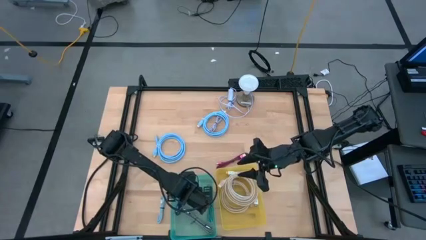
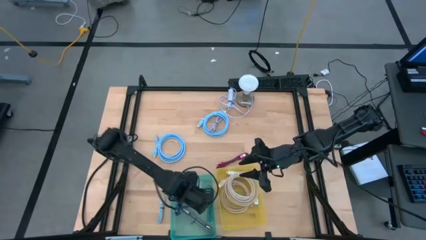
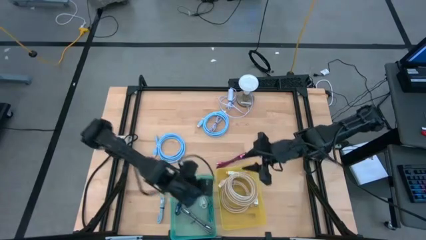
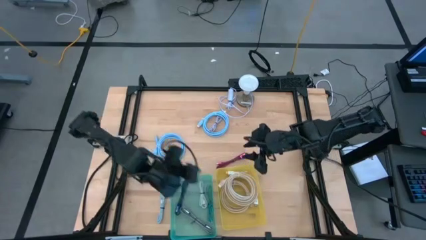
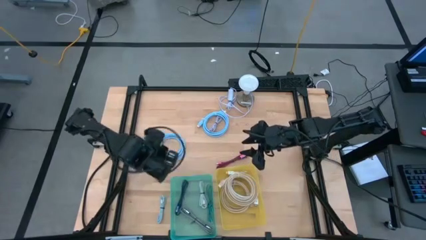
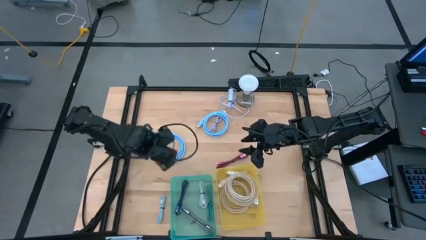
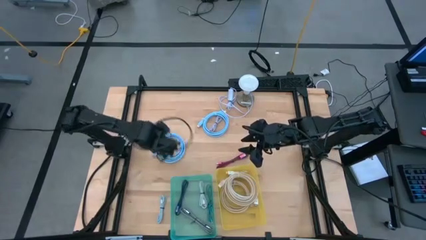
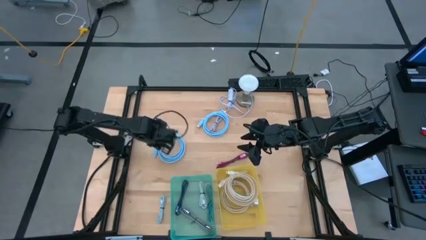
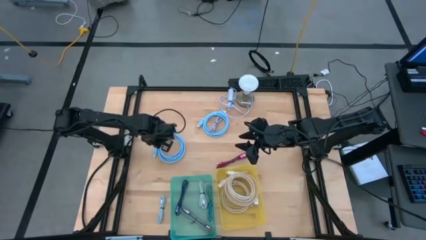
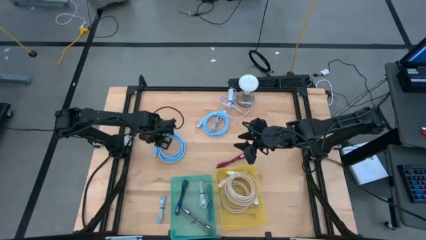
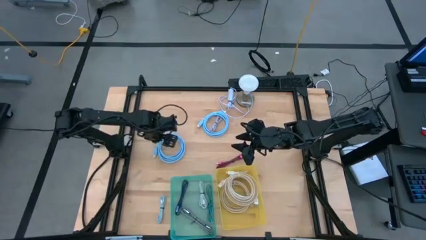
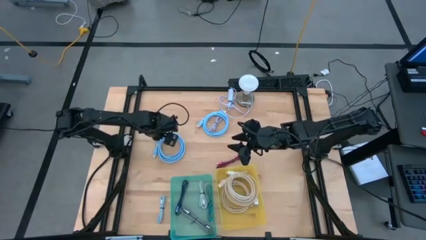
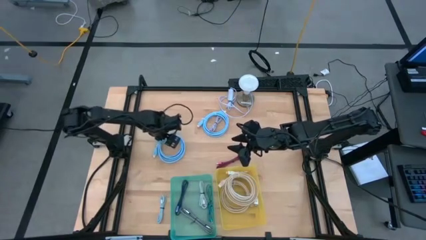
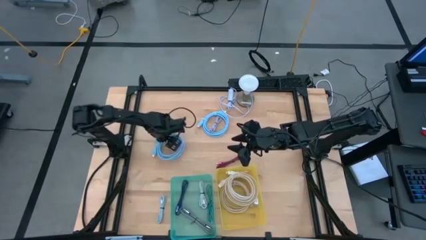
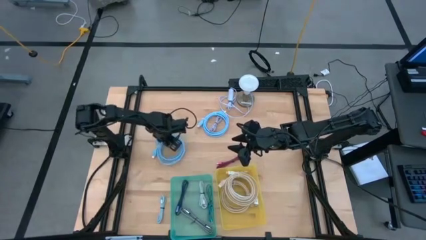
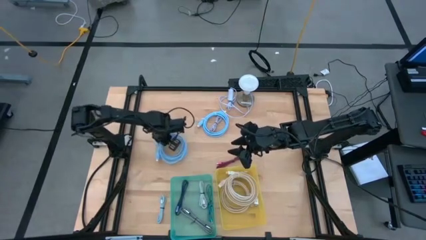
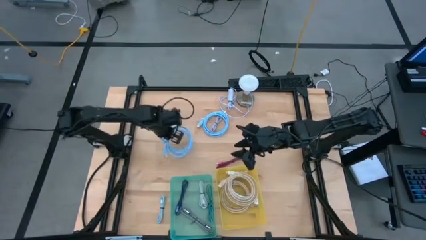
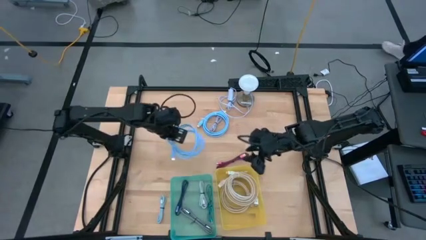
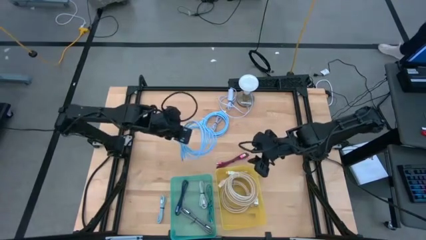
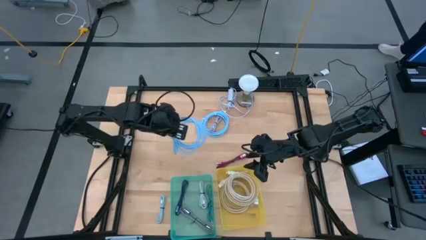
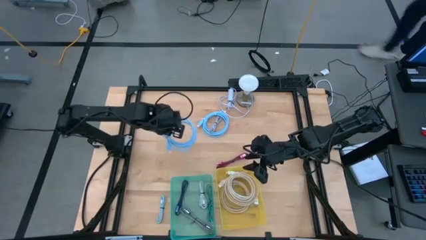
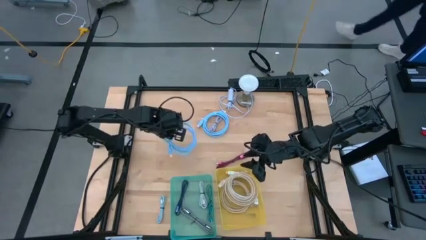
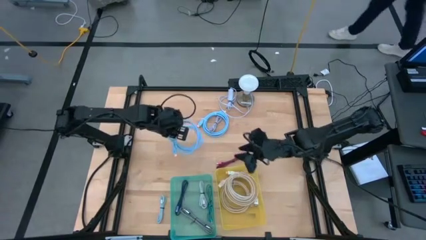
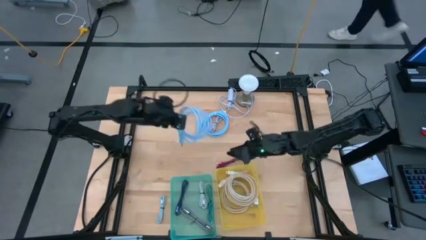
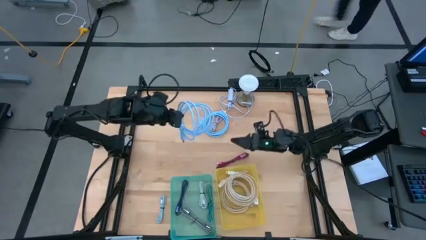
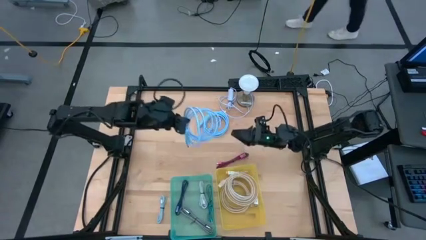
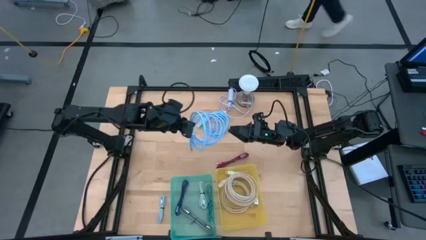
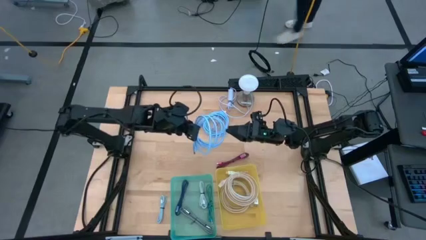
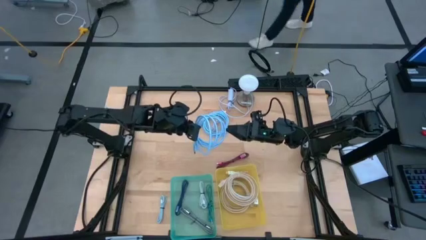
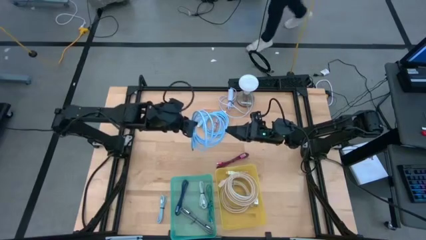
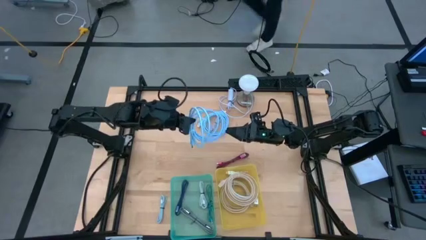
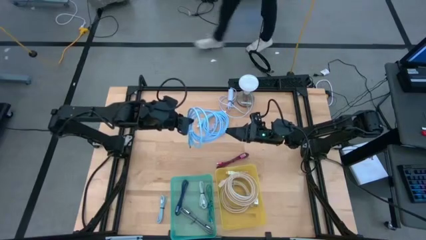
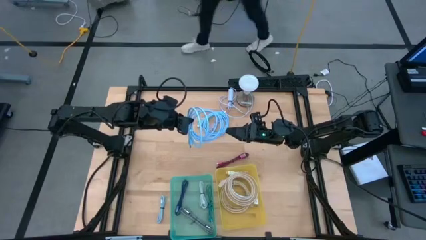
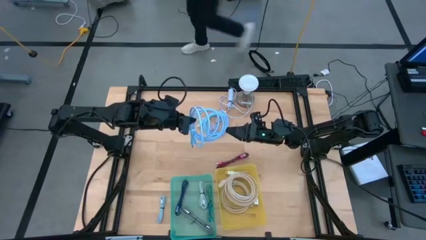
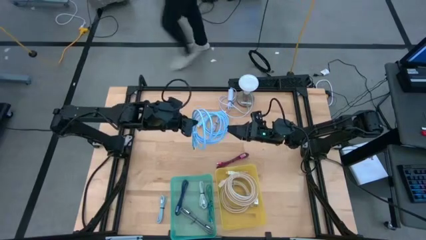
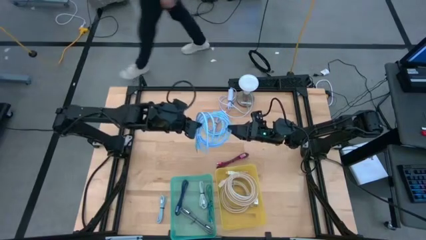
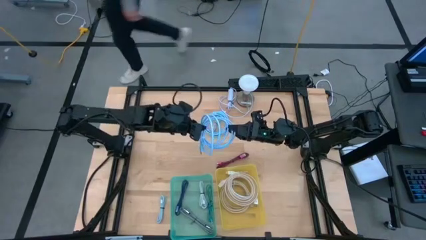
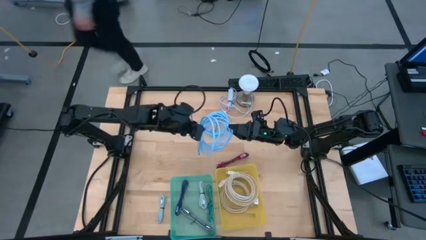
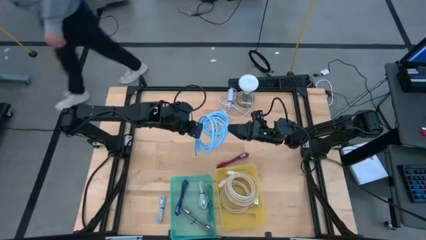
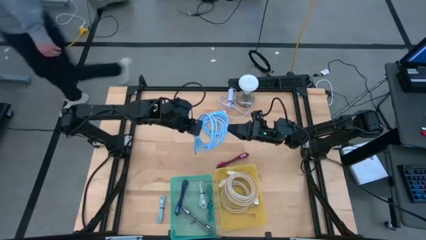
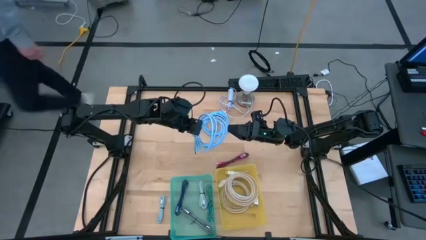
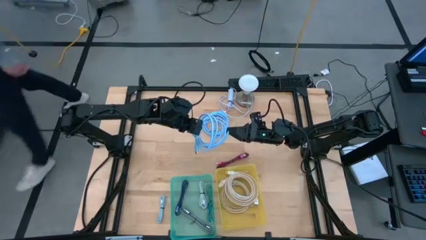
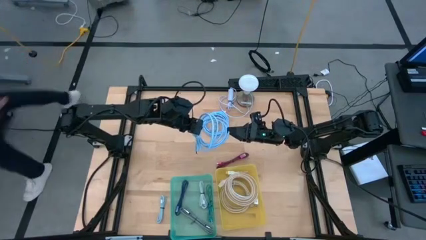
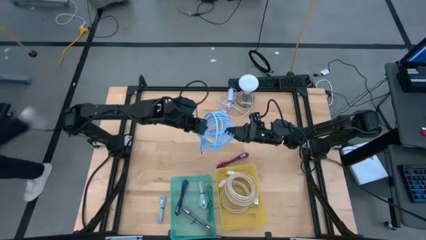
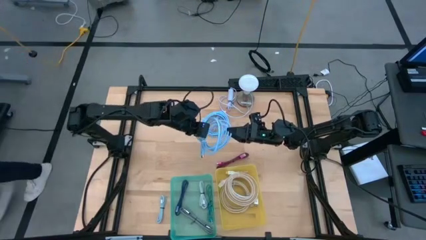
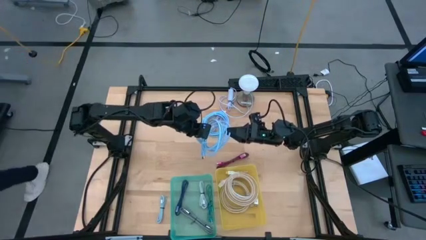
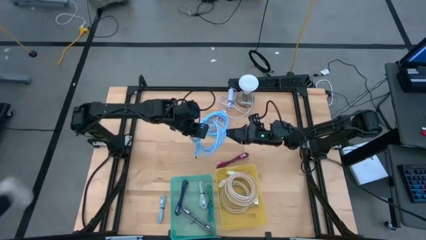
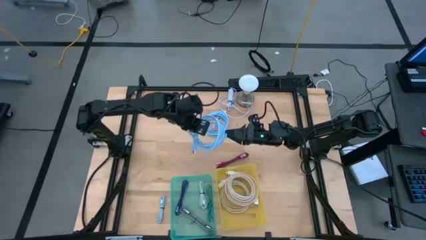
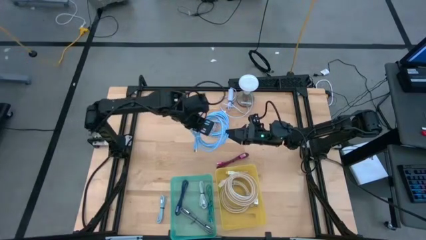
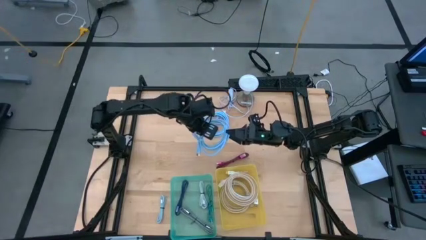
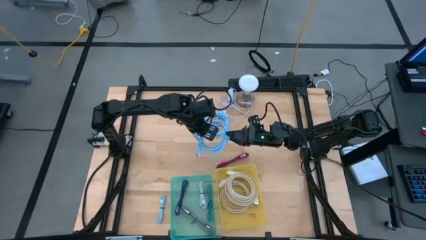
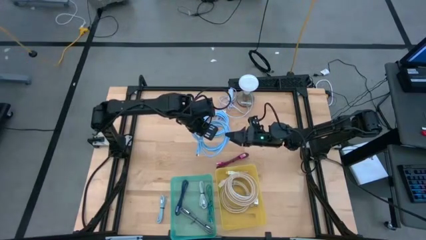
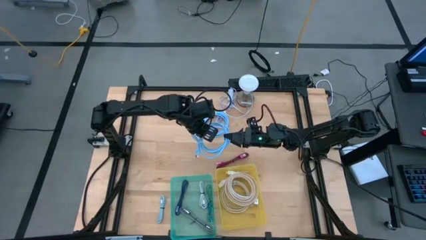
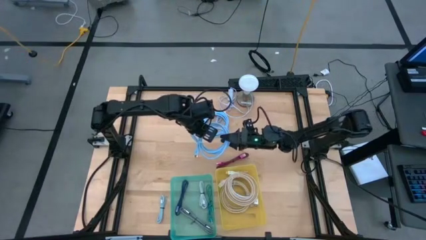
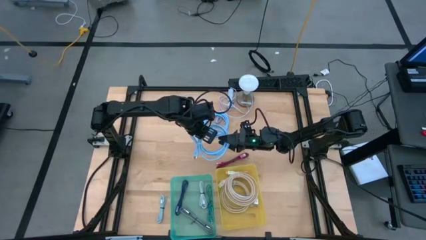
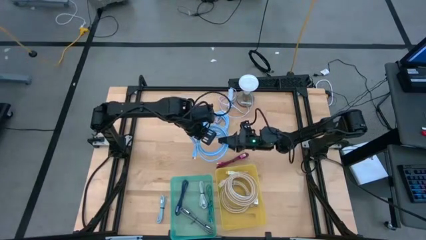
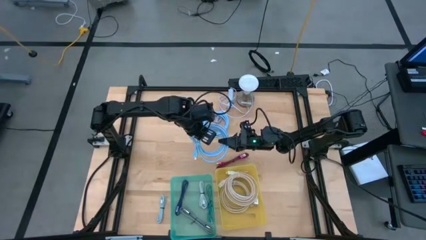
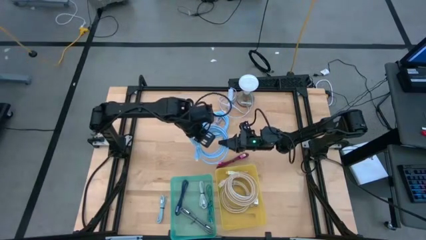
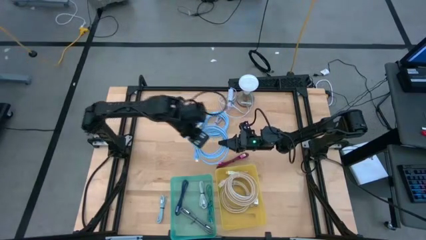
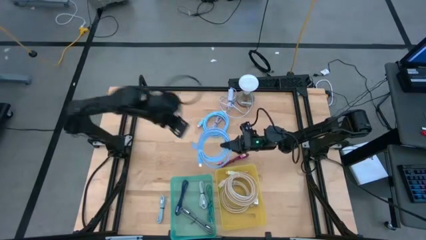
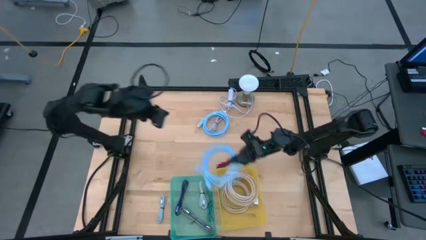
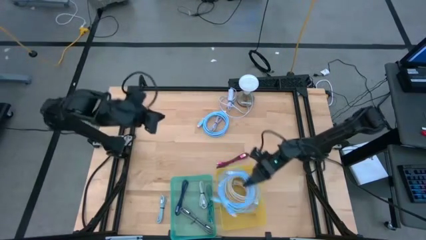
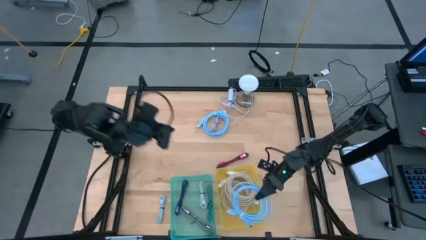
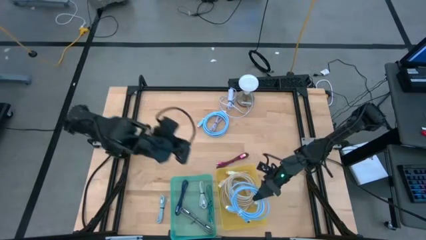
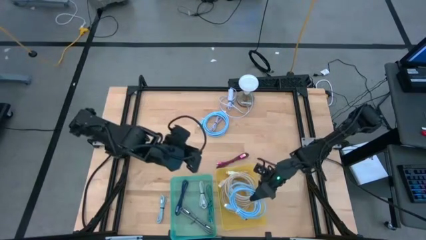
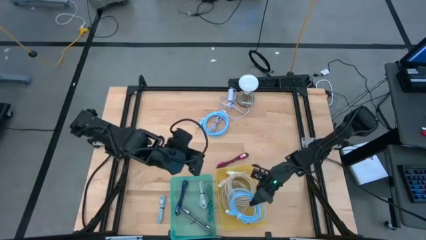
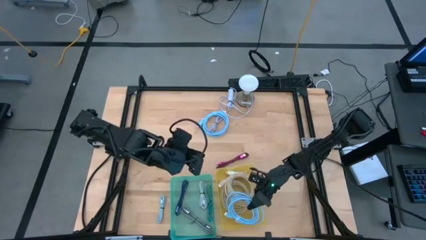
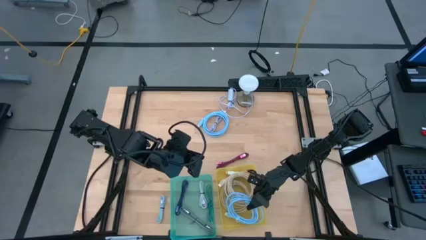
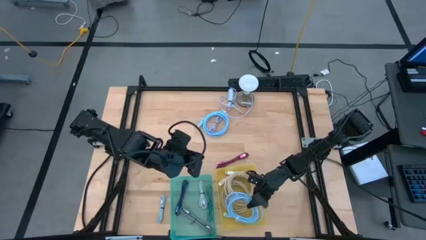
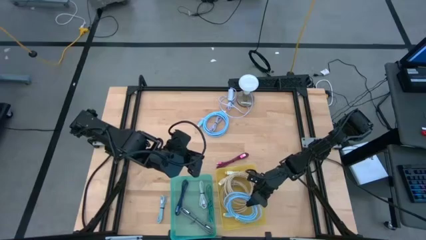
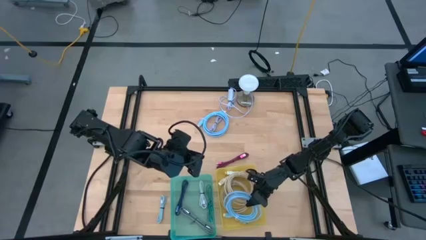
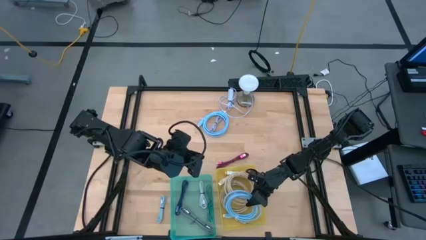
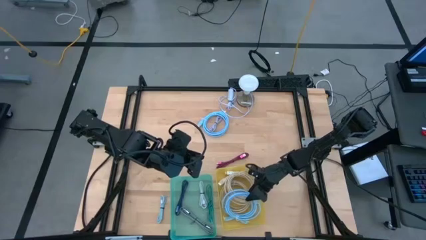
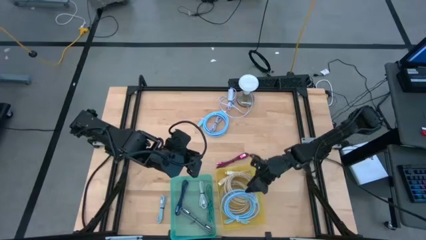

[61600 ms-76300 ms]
Task: Pick & Place USB Port
Put the left light blue hdmi cable into the yellow bin
